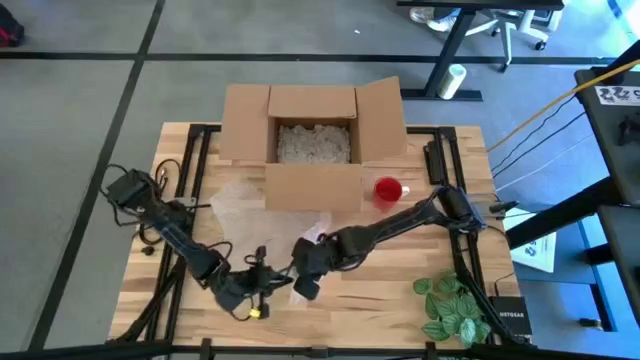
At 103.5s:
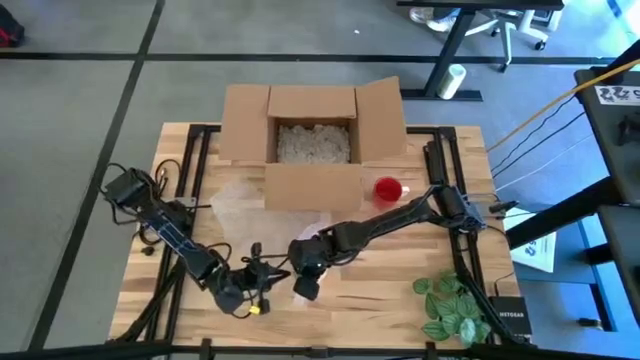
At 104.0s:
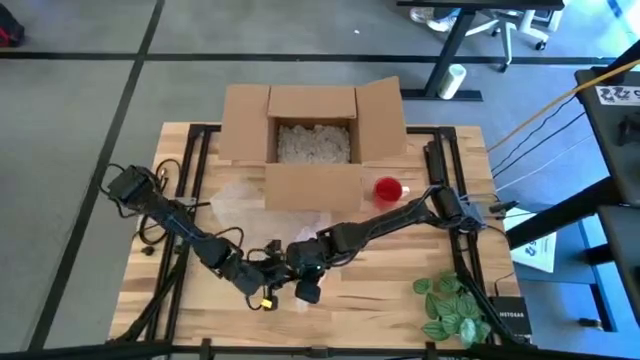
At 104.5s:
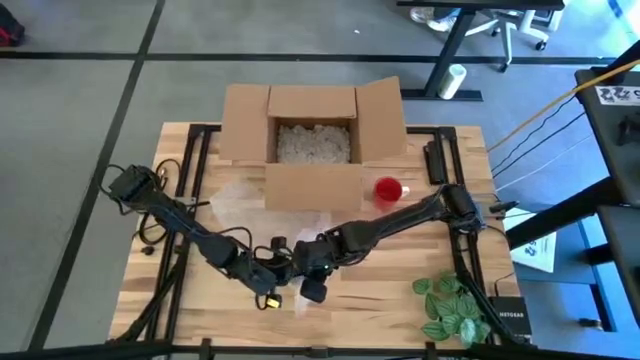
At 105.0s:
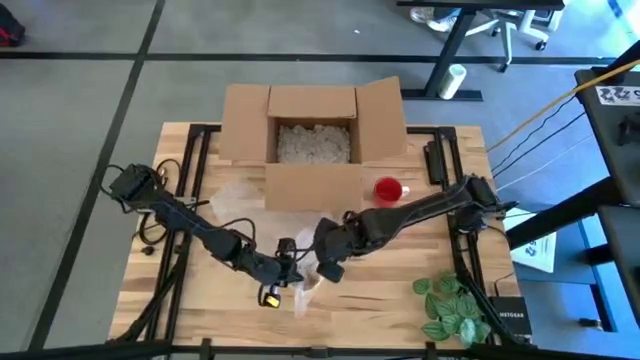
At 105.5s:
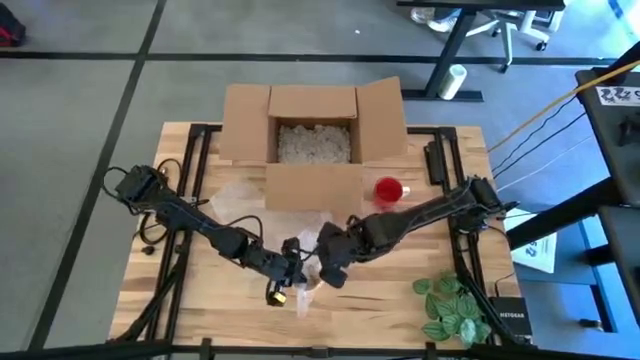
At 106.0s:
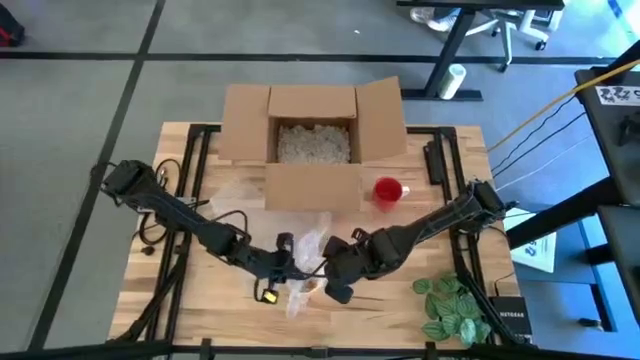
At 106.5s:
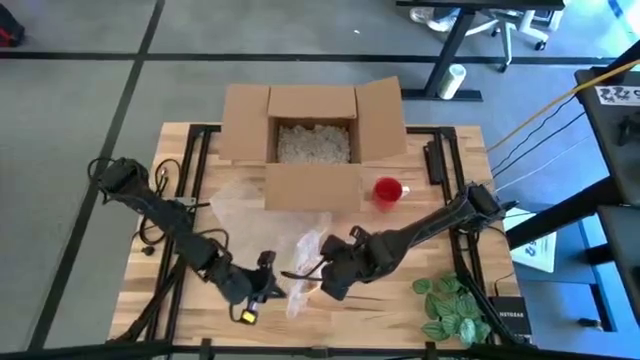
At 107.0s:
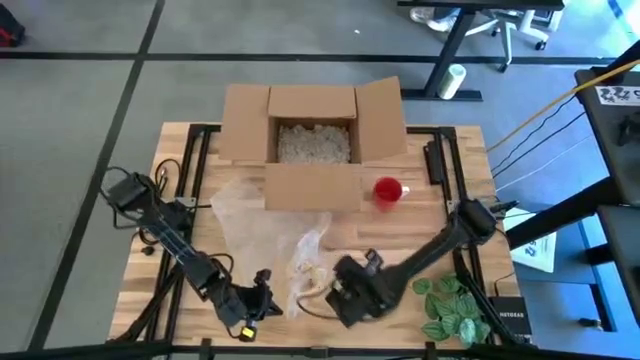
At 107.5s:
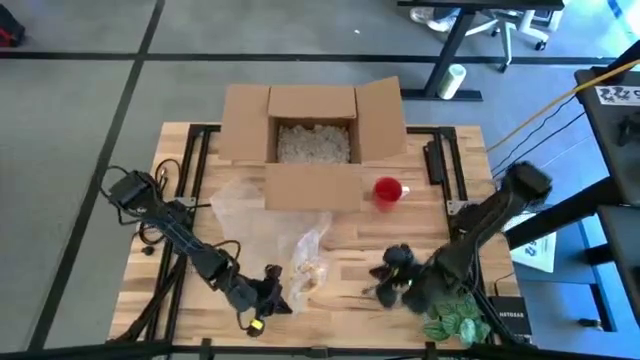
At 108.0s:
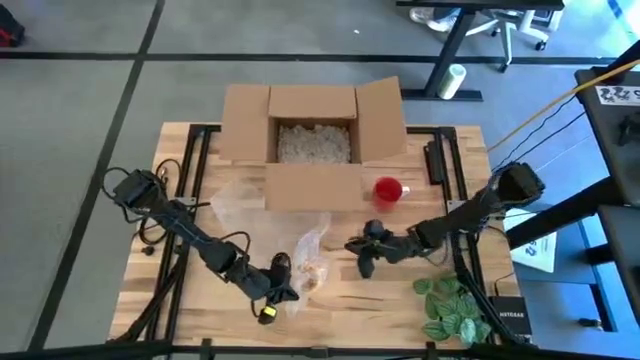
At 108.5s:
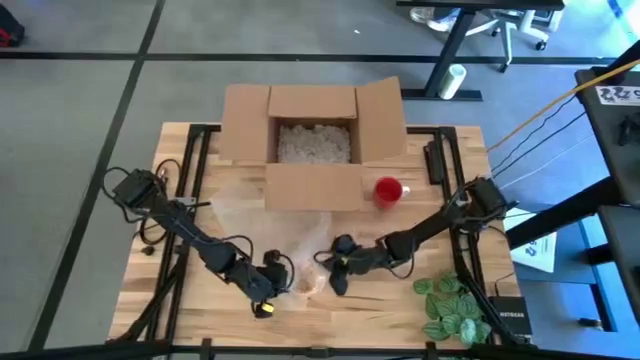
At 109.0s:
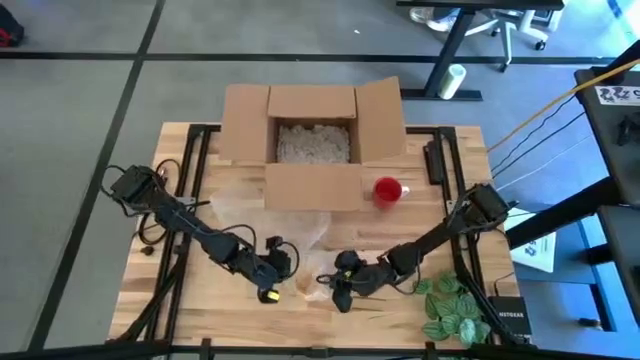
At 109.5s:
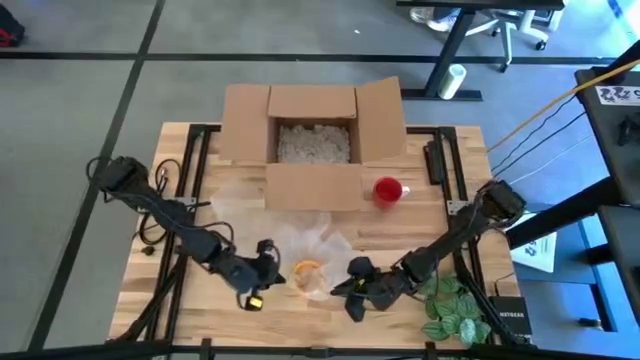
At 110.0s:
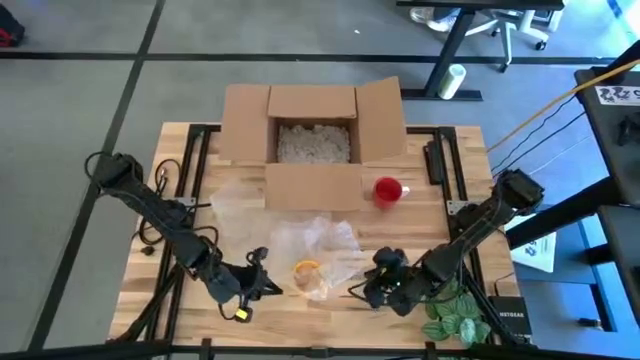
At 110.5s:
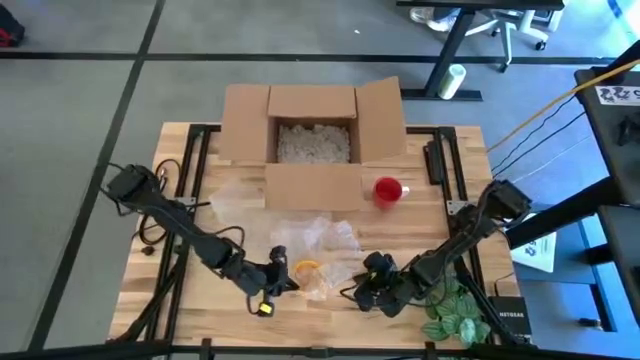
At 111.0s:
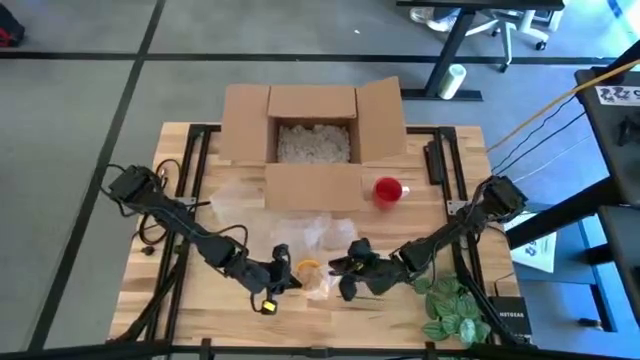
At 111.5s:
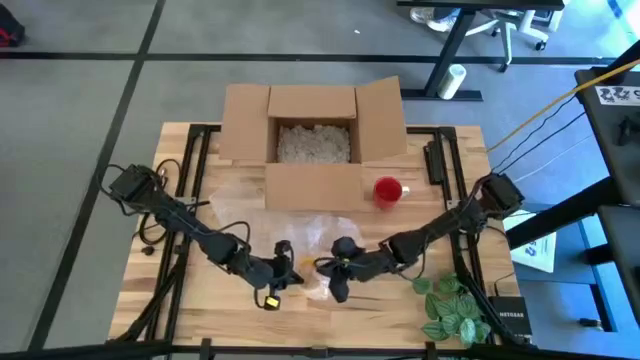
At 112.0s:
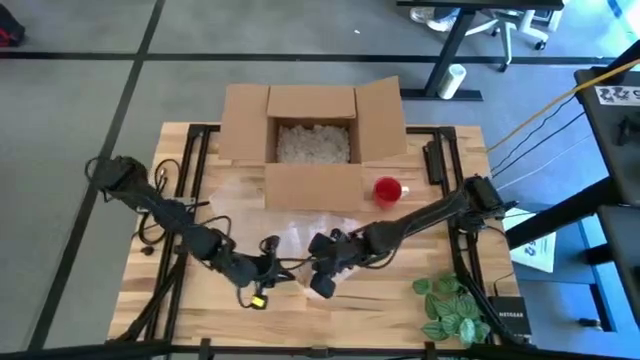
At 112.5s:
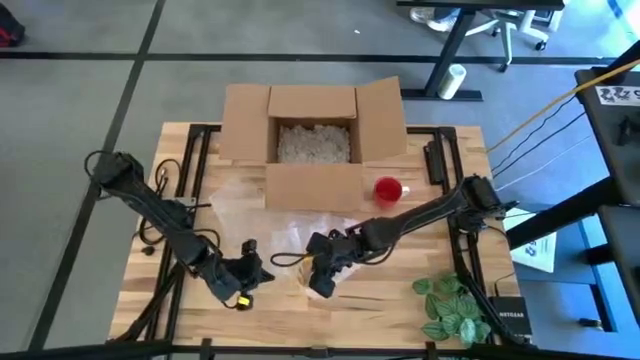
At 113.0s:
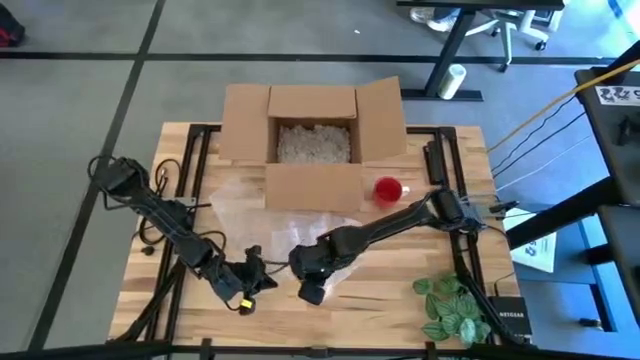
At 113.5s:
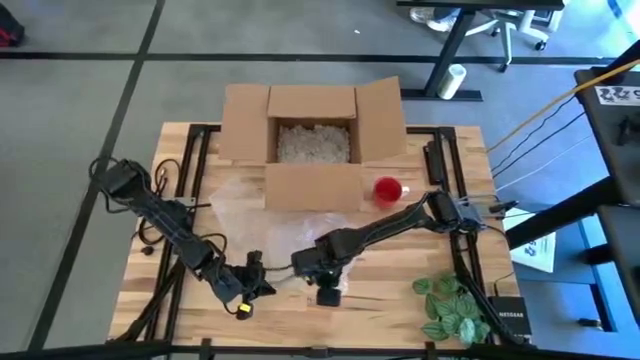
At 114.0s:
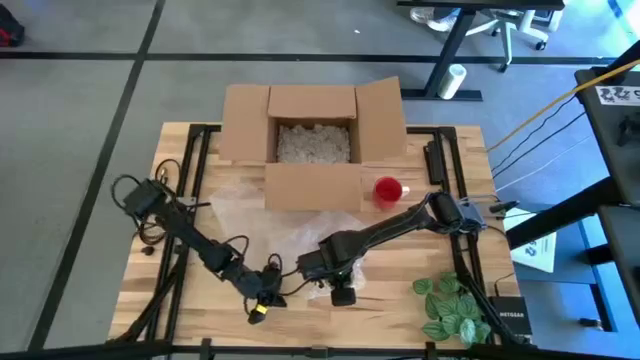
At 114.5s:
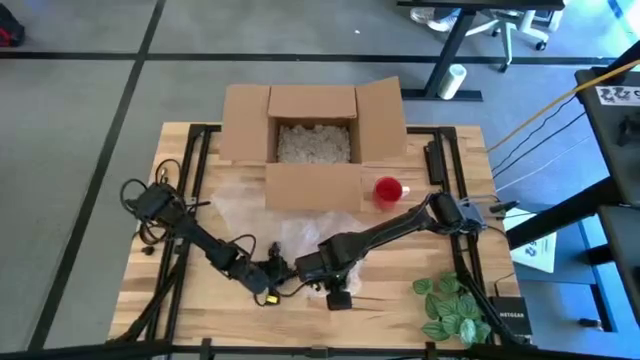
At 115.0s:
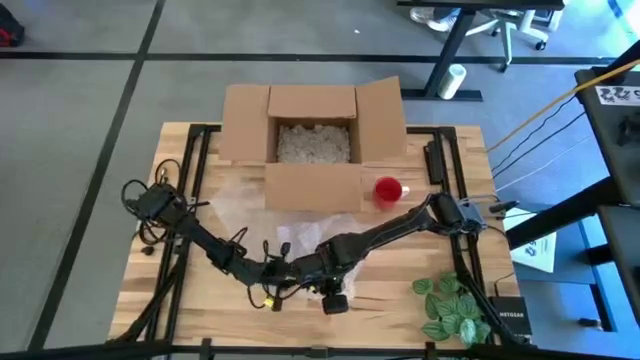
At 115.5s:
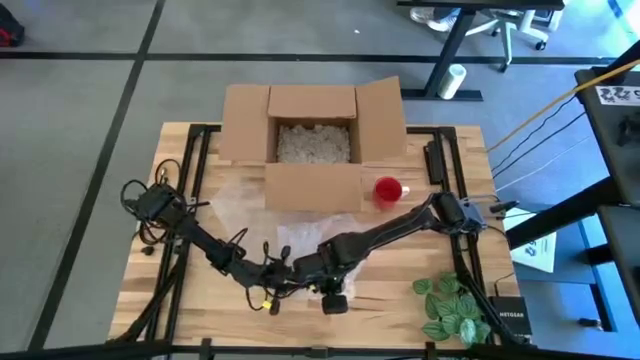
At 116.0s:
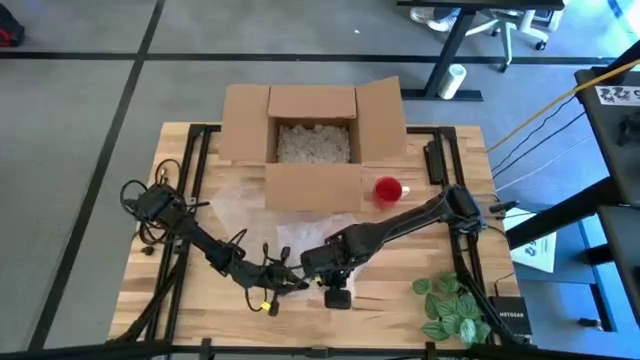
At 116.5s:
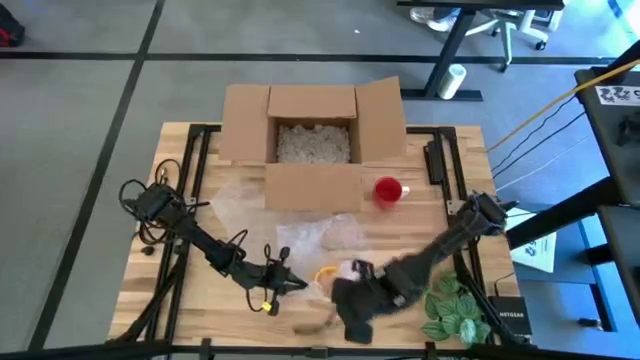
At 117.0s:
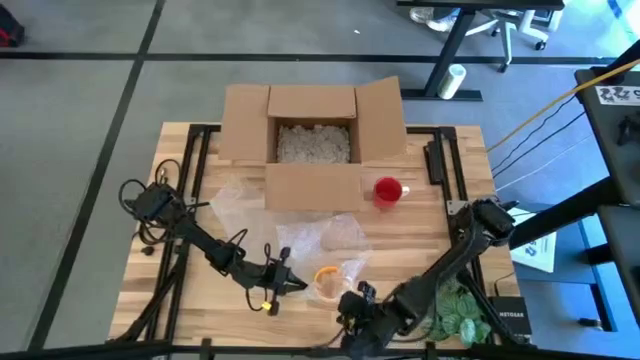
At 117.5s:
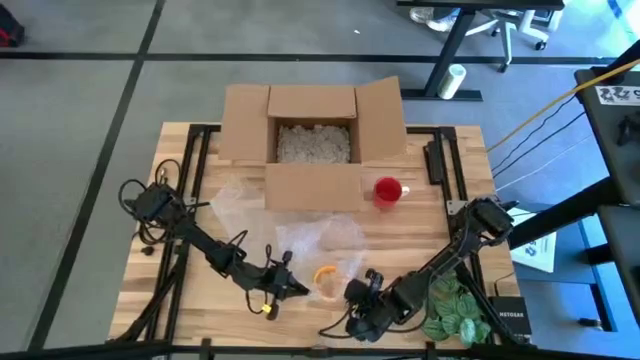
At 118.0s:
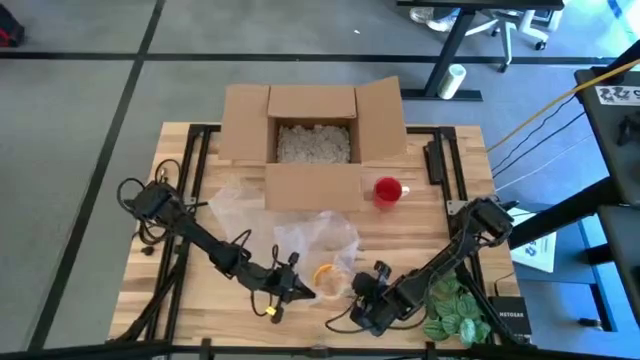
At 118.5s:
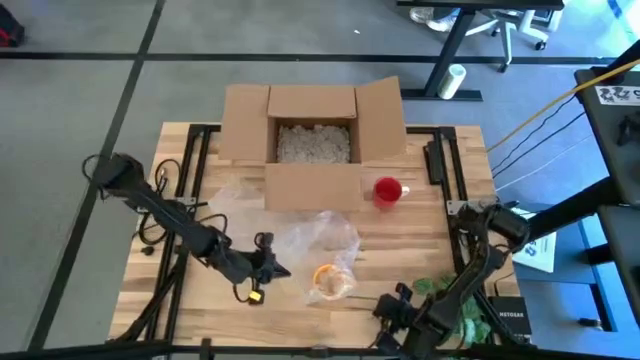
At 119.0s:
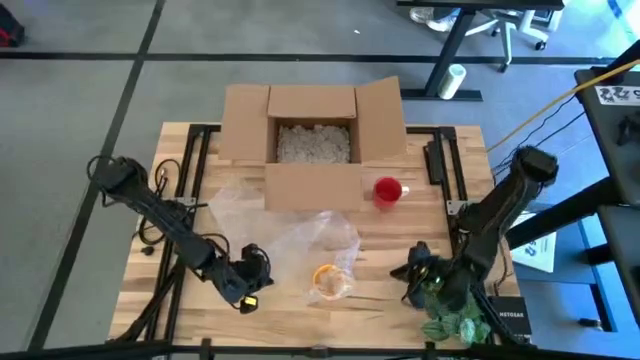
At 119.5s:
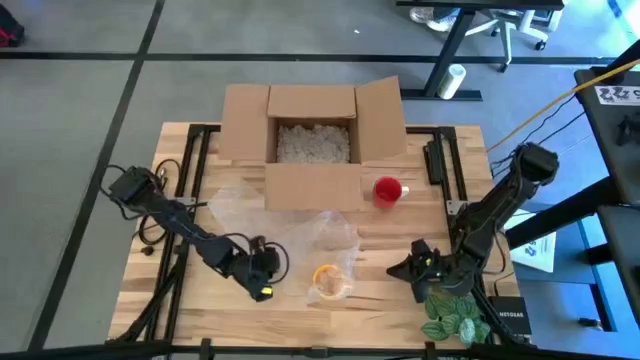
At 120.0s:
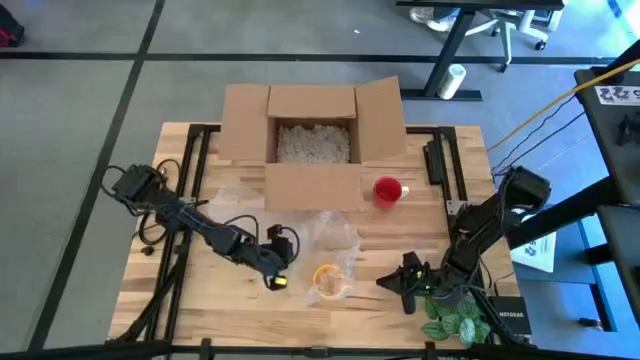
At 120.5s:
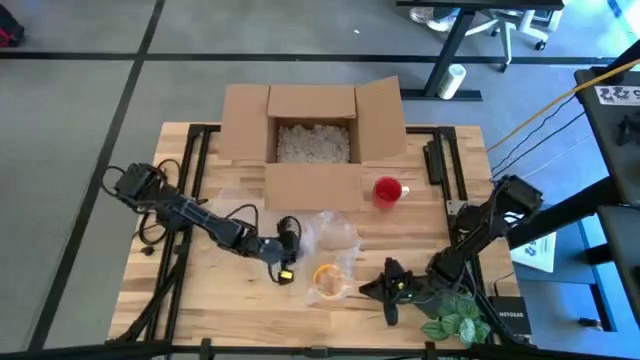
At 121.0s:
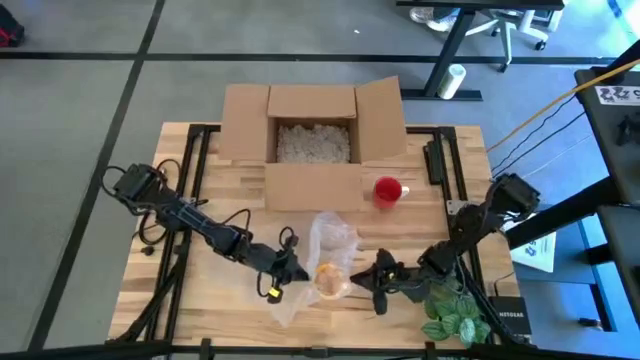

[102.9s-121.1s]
Task: wrap mug
Wrap the yellow mug using the bubble wrap

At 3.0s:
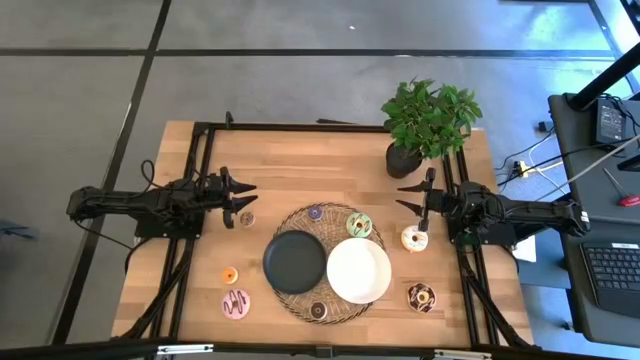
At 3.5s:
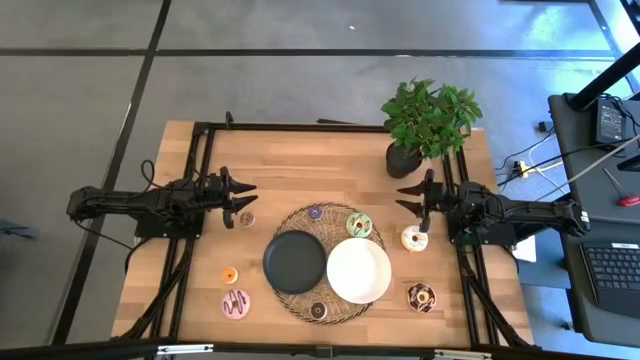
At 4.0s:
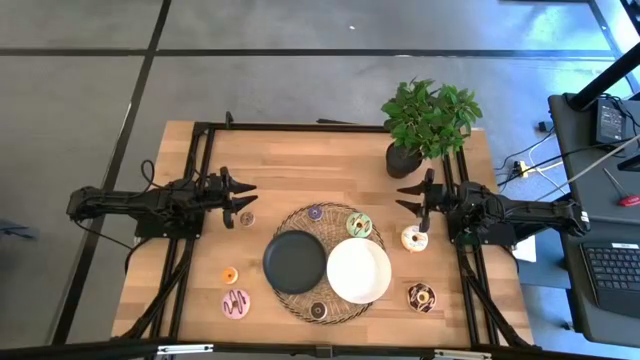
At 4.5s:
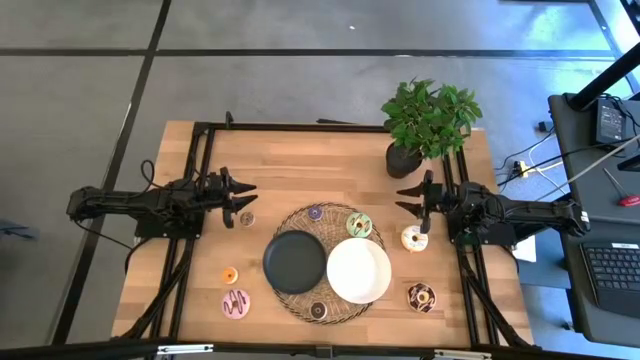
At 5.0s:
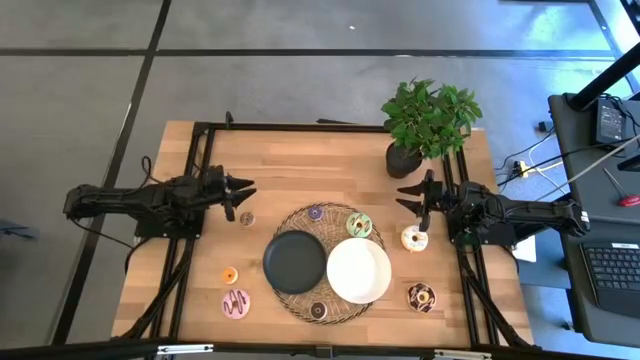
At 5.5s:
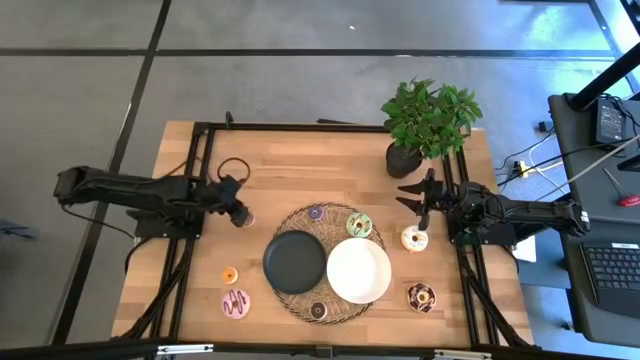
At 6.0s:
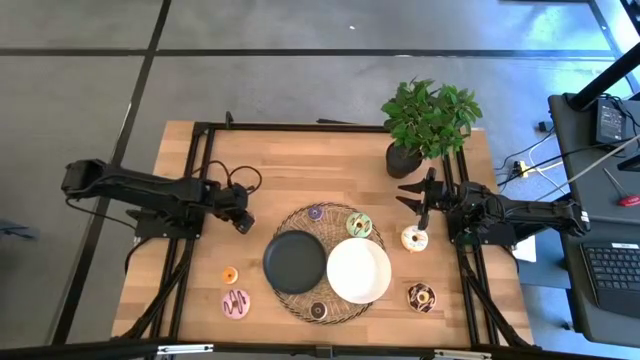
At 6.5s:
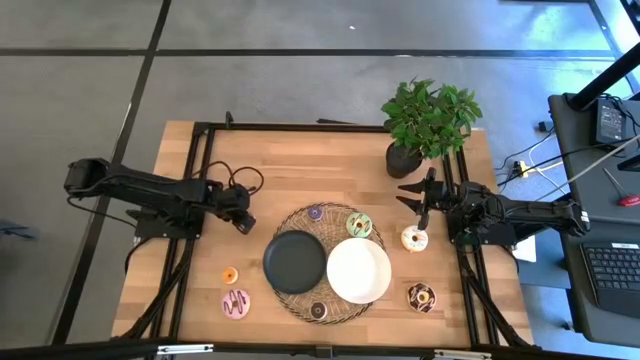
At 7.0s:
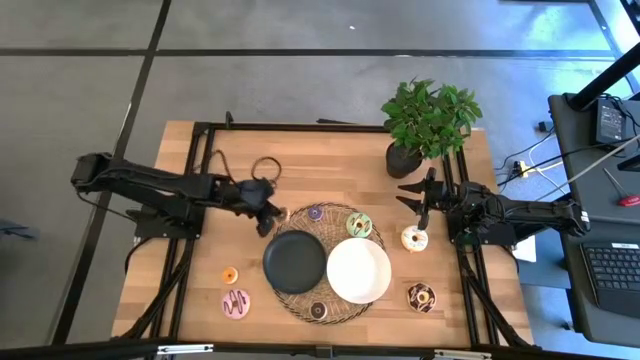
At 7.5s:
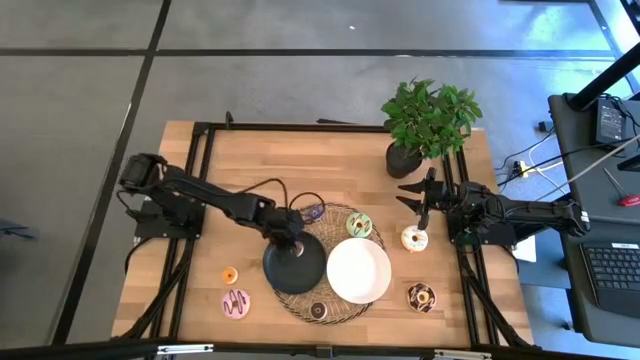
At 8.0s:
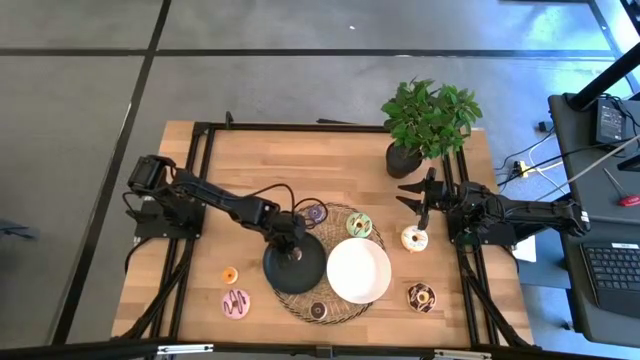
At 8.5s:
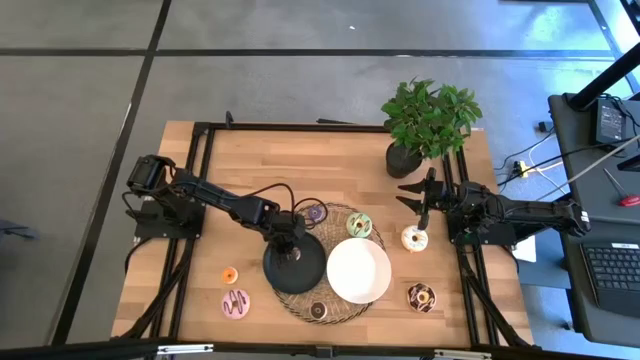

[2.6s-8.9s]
Task: Pick & Place donuts
Put the small brown donut into the black plate
